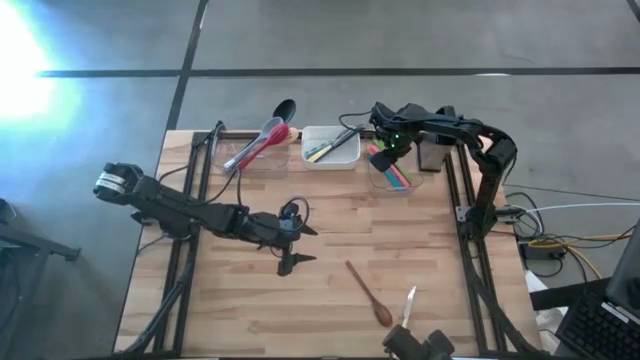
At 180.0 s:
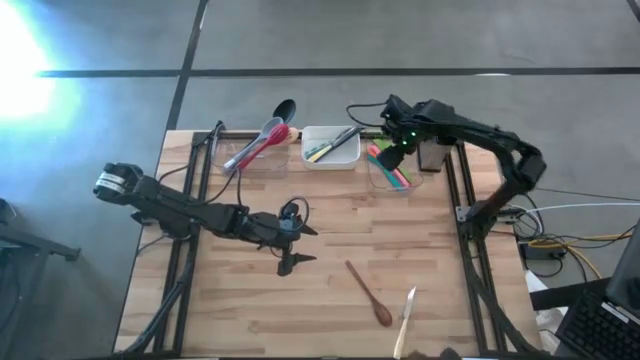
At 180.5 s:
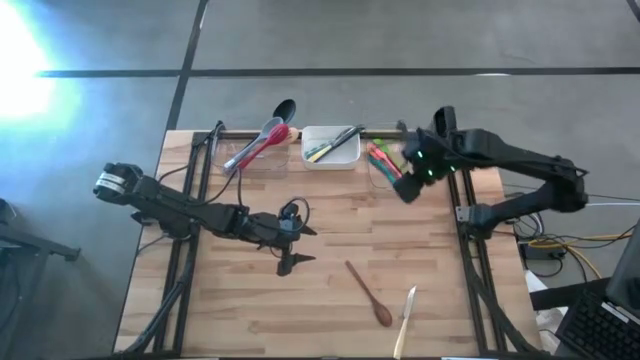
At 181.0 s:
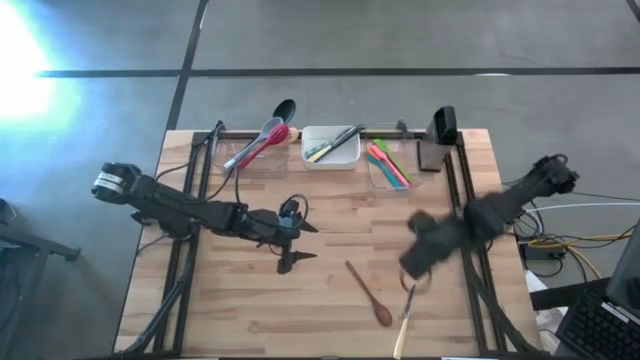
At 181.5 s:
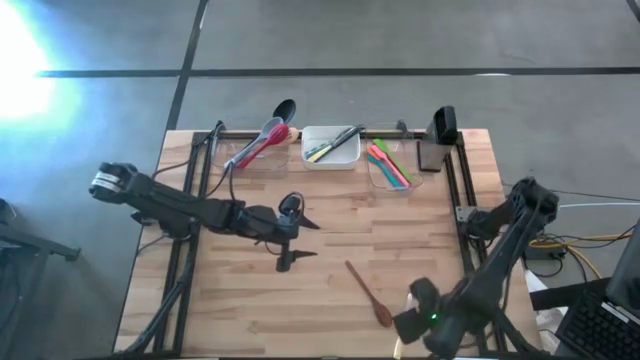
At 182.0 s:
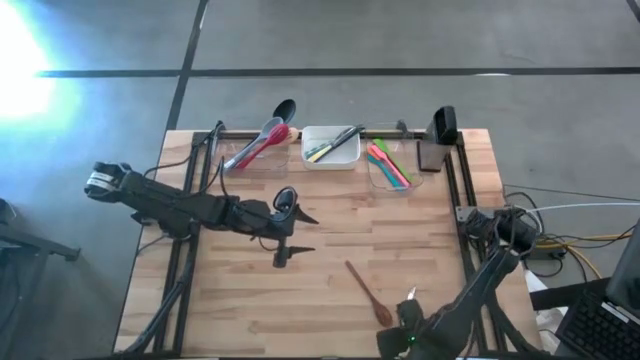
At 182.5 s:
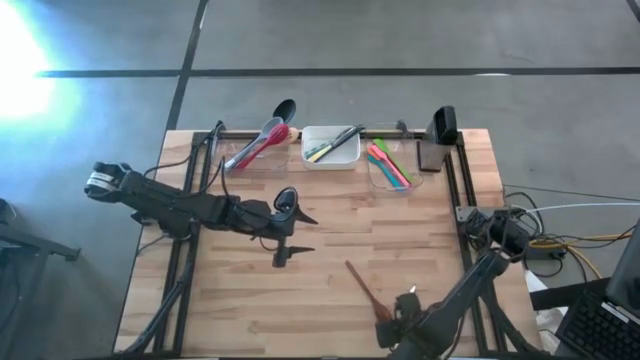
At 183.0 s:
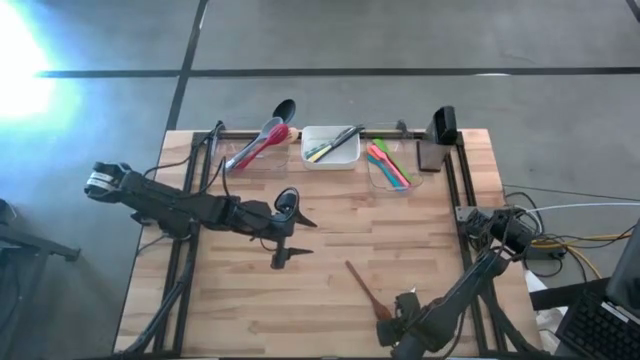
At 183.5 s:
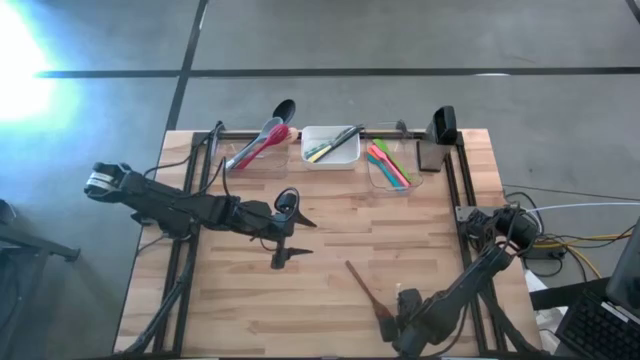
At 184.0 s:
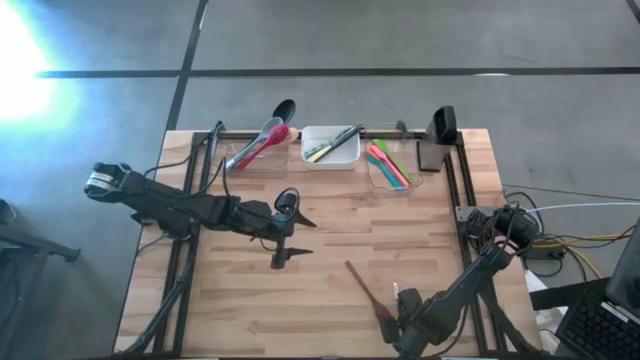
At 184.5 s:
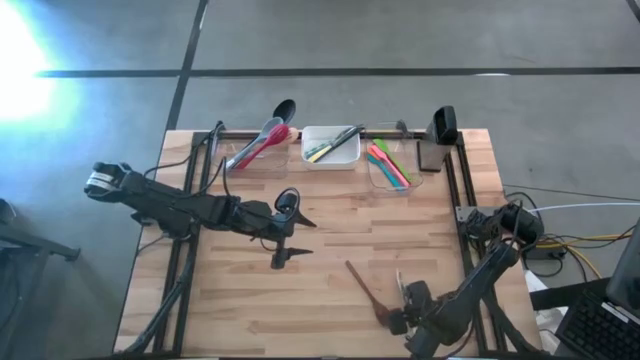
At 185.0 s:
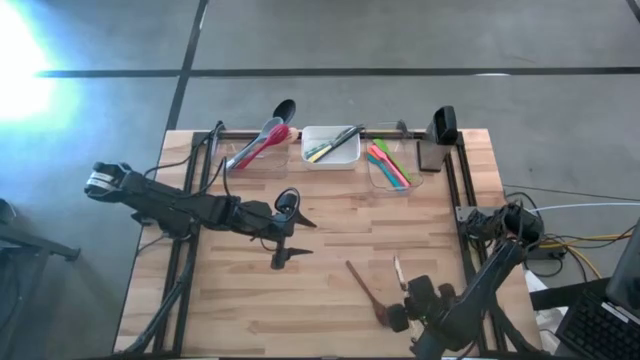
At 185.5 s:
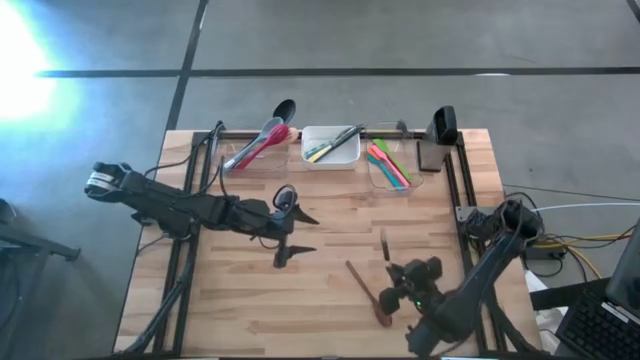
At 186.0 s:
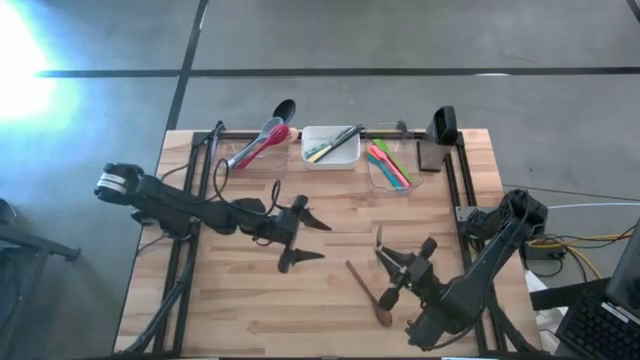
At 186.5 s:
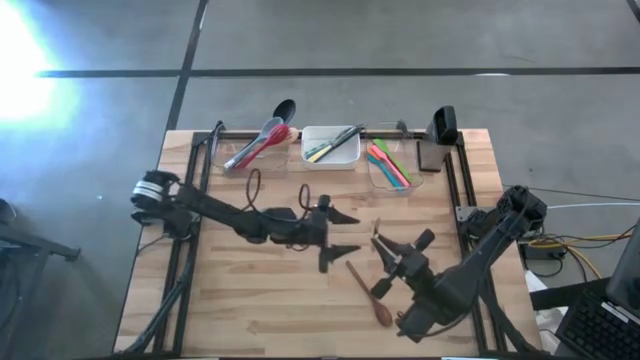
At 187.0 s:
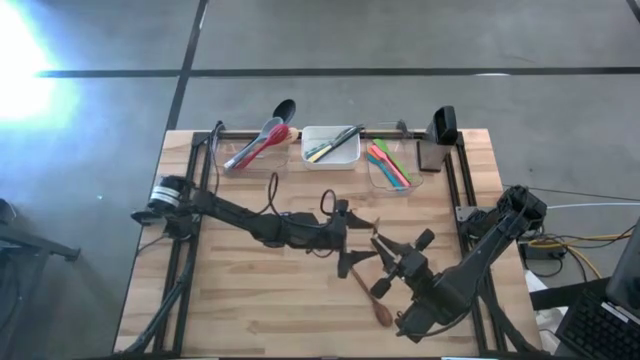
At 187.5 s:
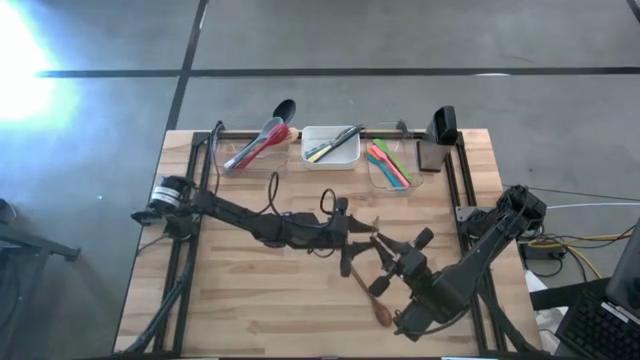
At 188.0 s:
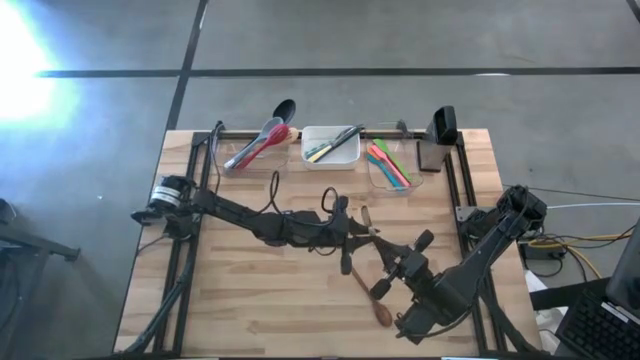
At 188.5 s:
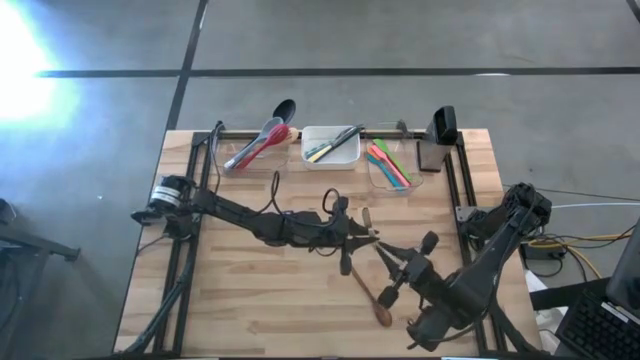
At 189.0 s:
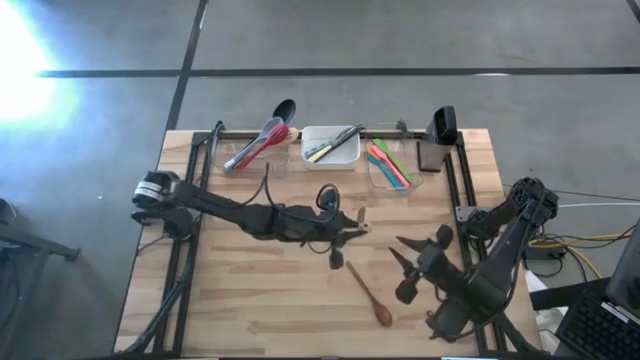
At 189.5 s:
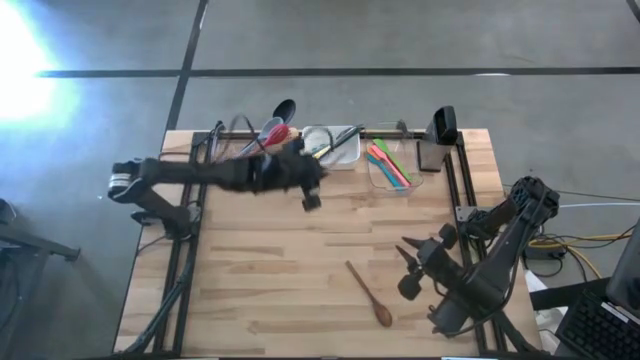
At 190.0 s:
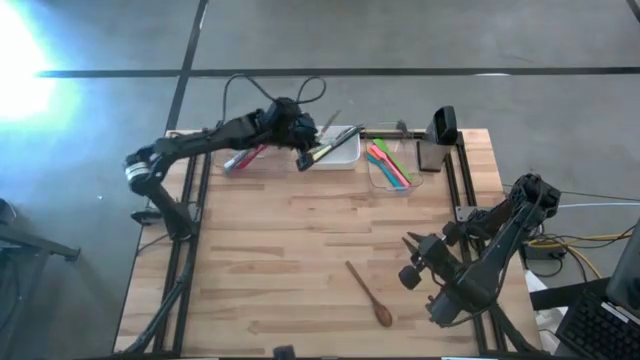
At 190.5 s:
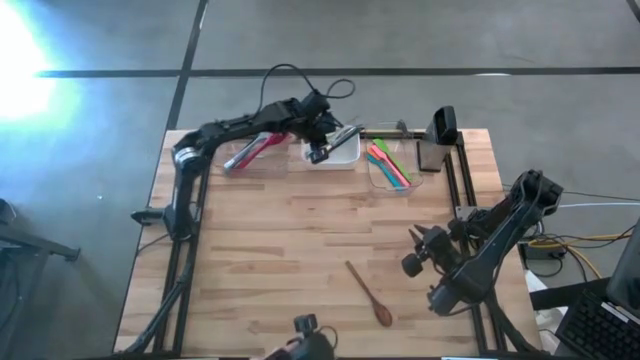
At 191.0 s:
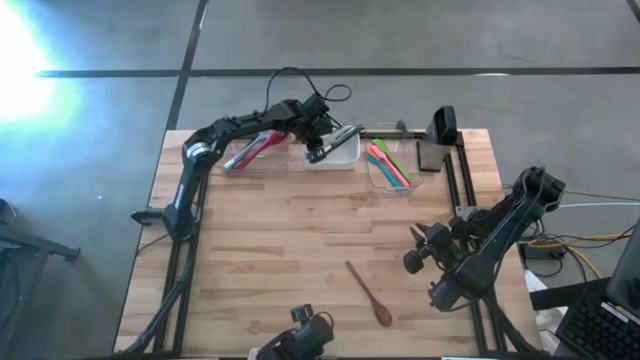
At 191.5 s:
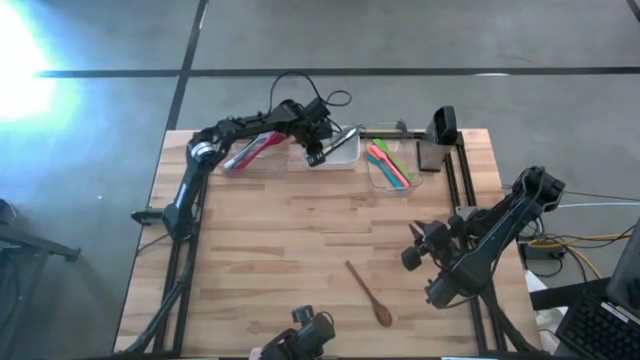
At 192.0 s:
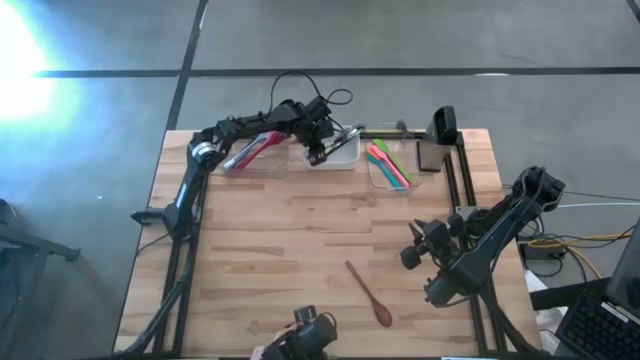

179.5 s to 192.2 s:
Task: Pick & Place Kitchen Items
Put the yellow table knife into the white bin

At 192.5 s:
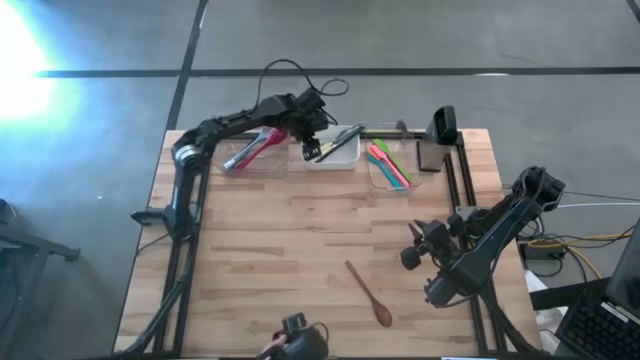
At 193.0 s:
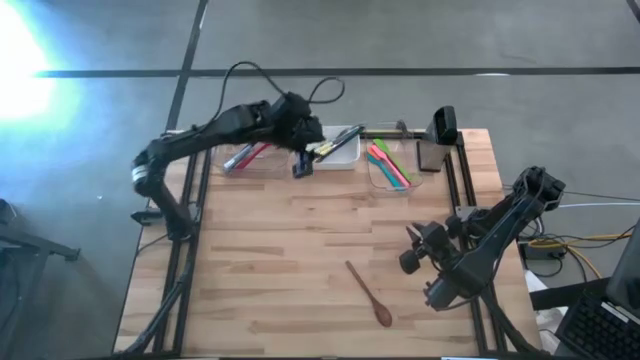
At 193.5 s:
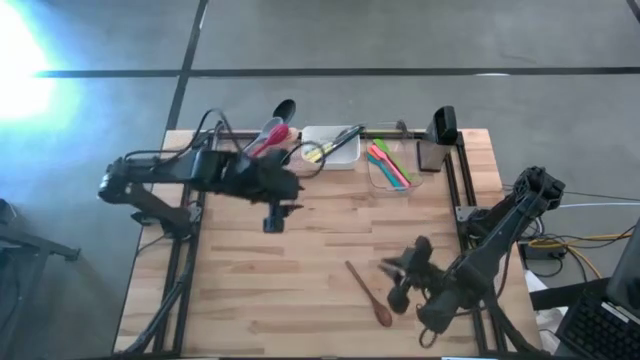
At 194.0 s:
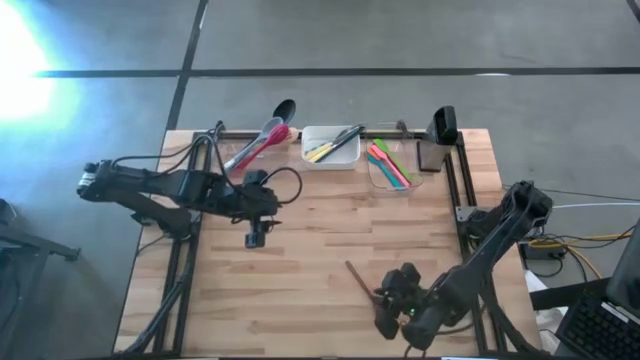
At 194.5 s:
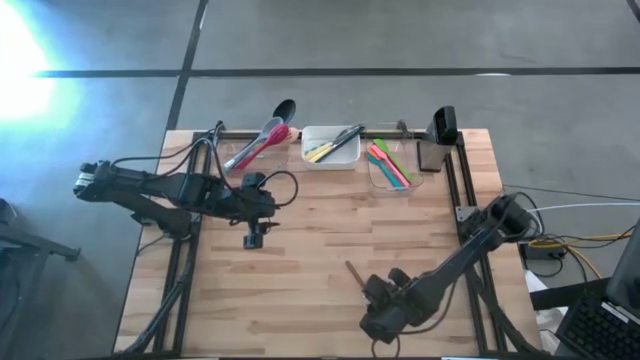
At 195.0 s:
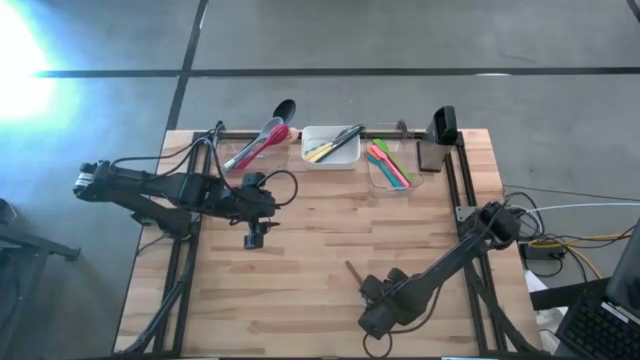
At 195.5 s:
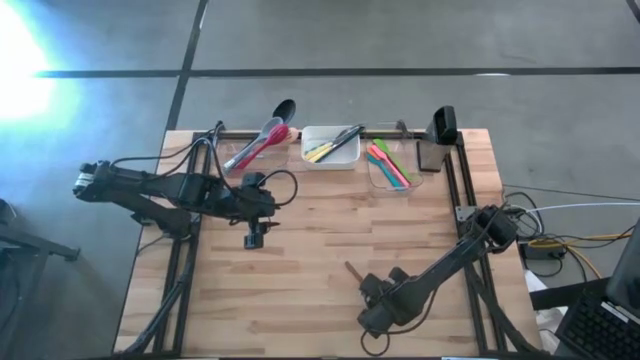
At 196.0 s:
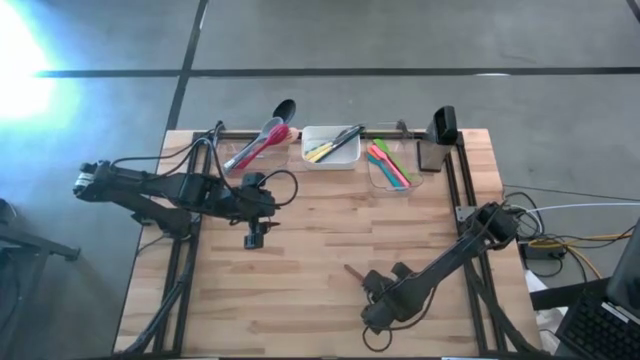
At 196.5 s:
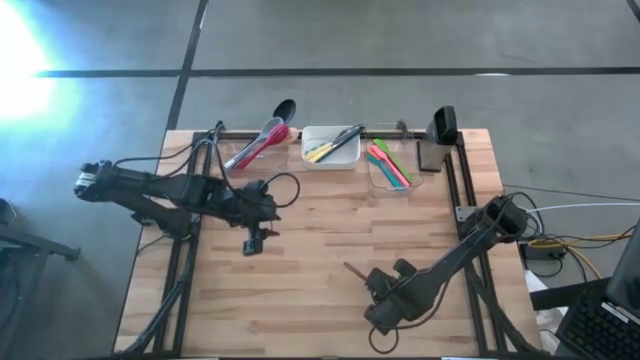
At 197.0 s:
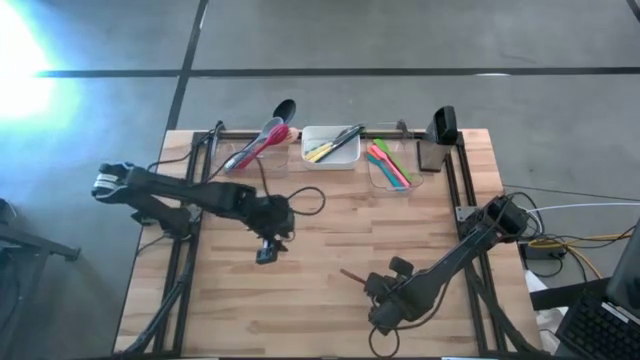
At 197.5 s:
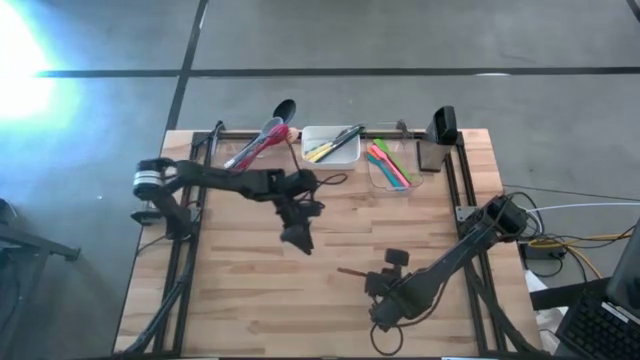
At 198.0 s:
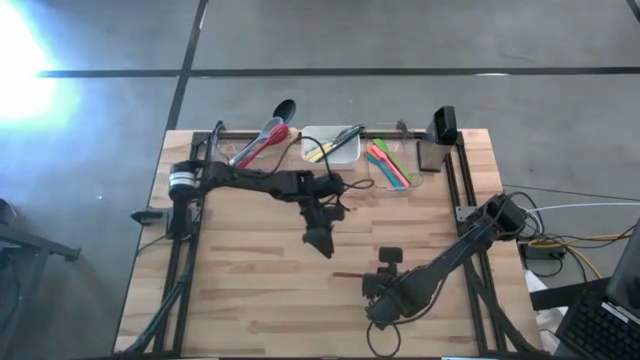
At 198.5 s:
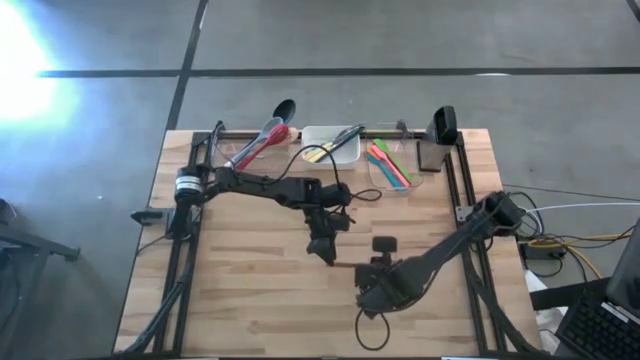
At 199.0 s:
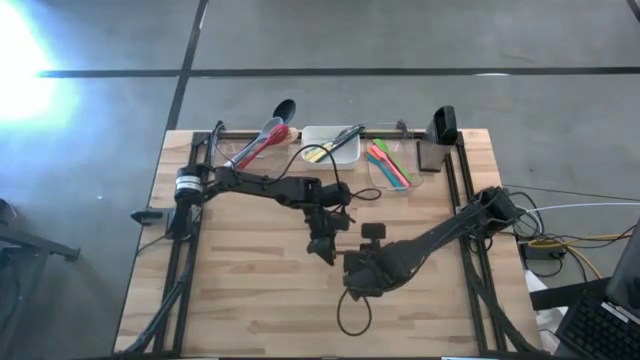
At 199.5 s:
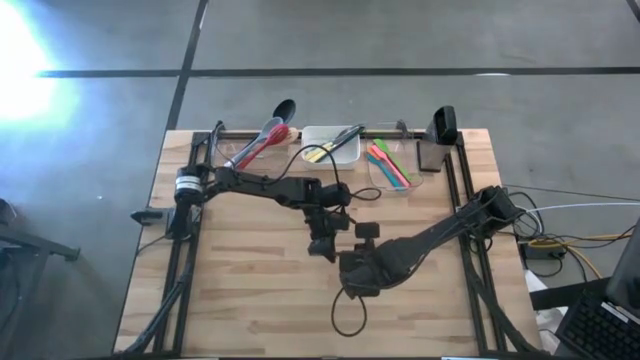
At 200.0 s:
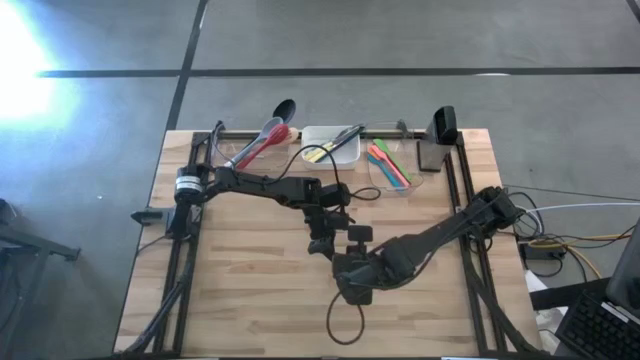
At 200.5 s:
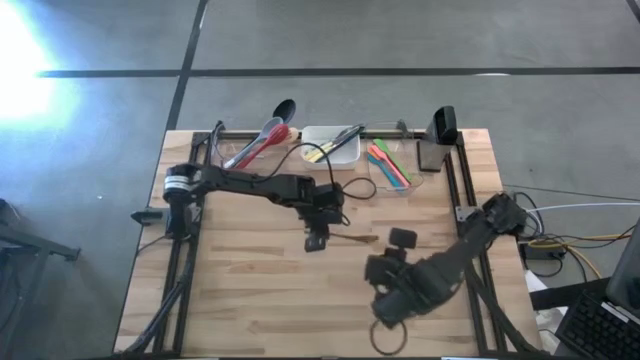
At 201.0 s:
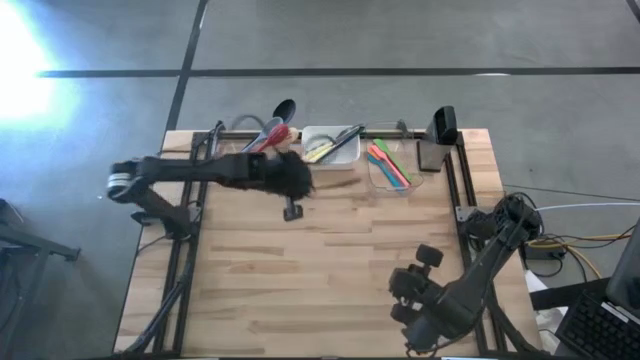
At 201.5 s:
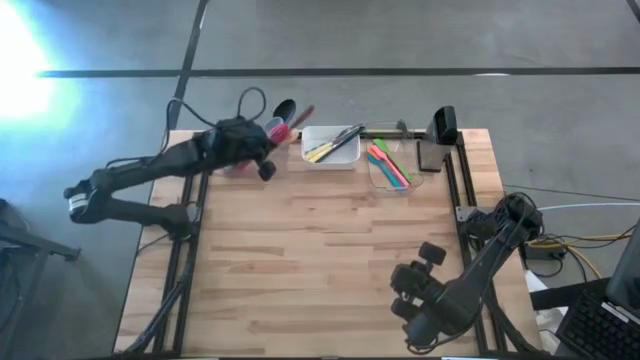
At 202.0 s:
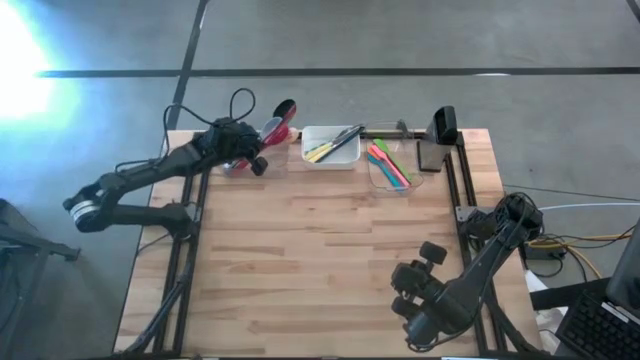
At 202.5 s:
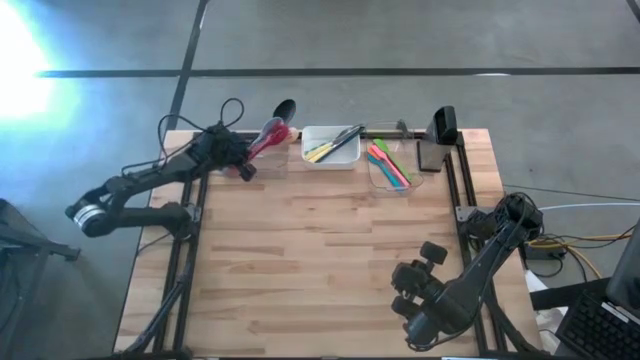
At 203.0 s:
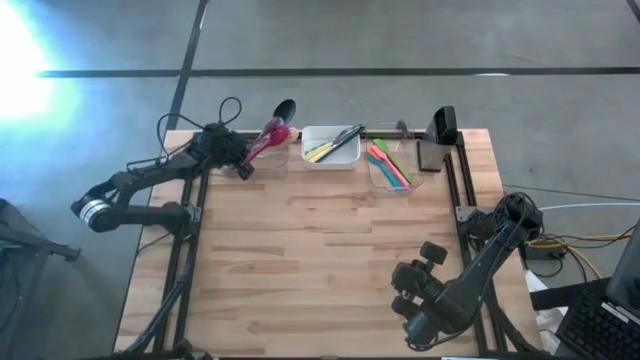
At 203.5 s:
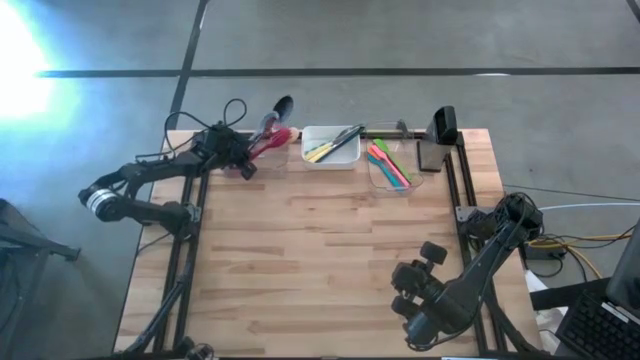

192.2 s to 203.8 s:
Put the dark brown serving spoon into the left transparent bin
